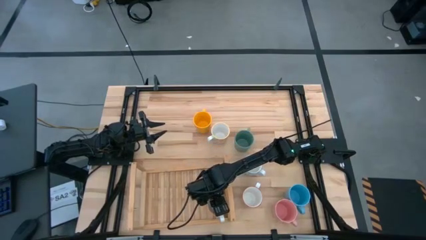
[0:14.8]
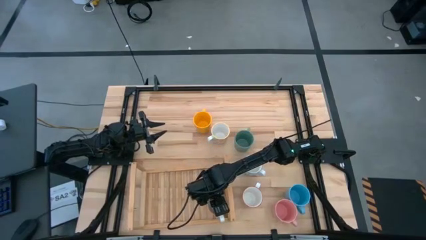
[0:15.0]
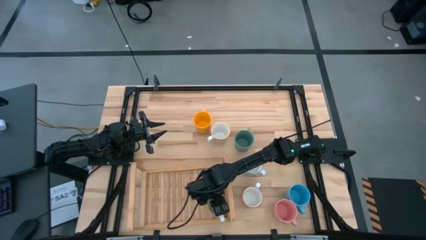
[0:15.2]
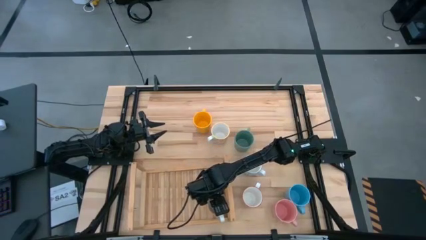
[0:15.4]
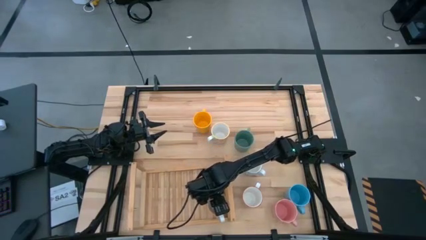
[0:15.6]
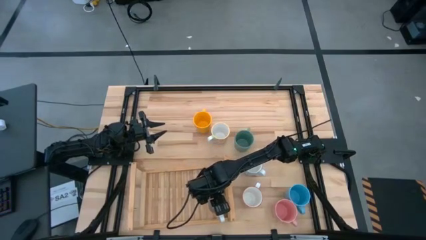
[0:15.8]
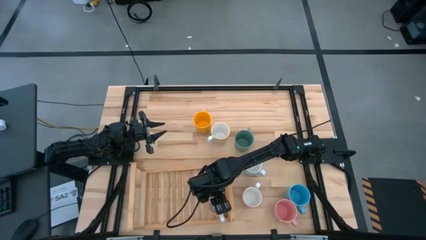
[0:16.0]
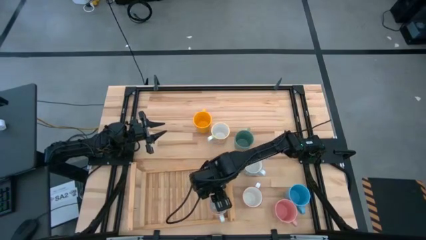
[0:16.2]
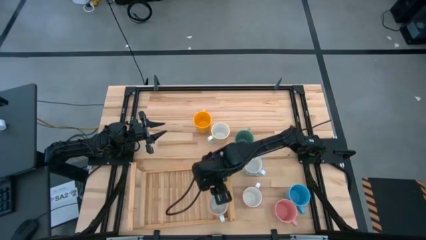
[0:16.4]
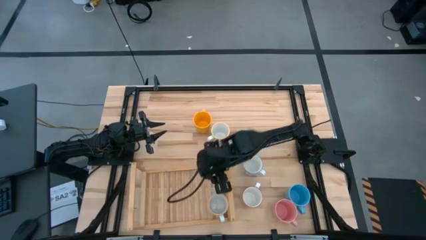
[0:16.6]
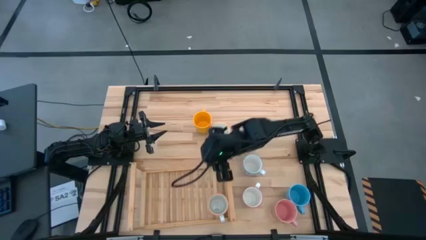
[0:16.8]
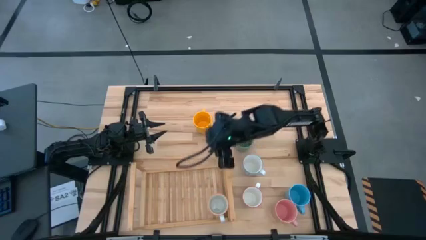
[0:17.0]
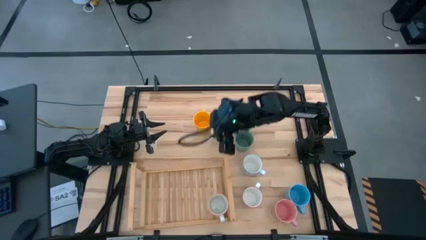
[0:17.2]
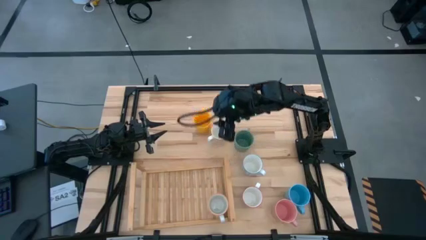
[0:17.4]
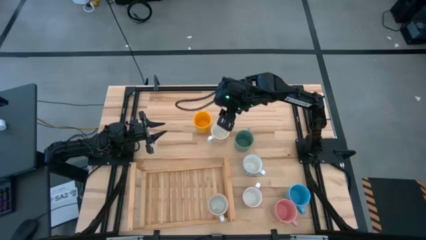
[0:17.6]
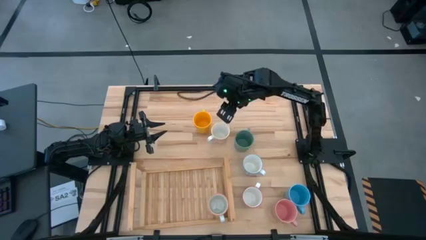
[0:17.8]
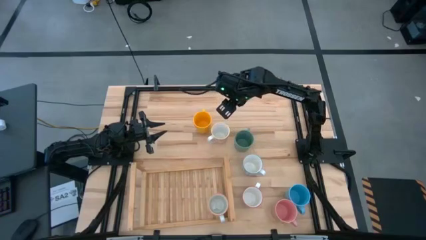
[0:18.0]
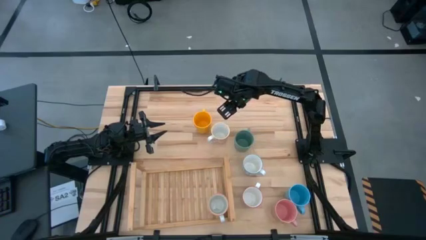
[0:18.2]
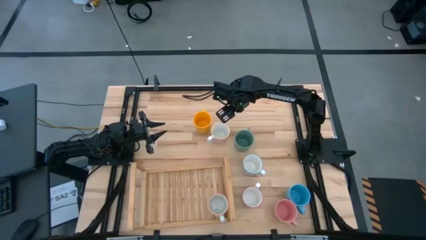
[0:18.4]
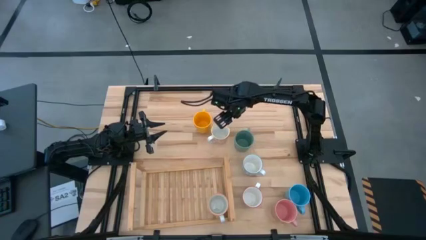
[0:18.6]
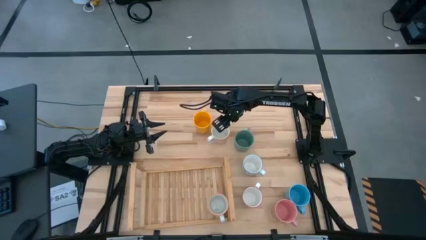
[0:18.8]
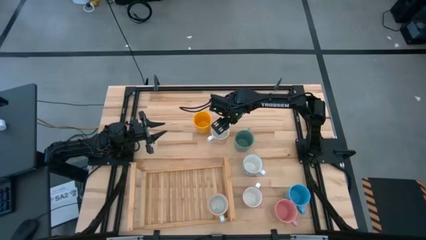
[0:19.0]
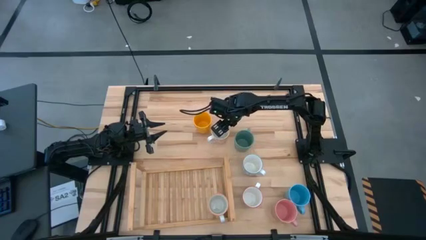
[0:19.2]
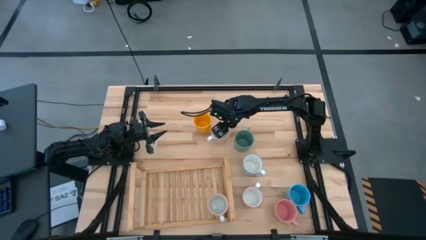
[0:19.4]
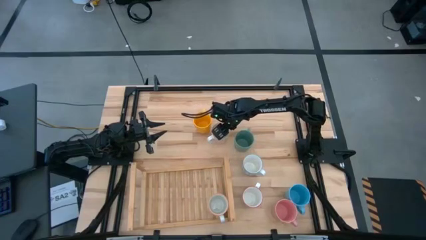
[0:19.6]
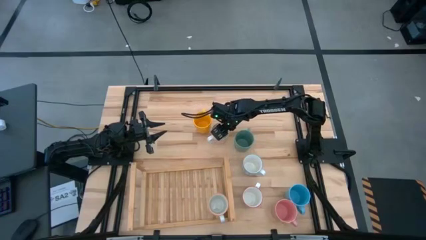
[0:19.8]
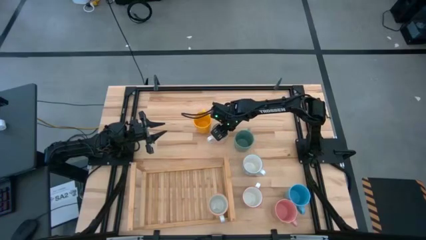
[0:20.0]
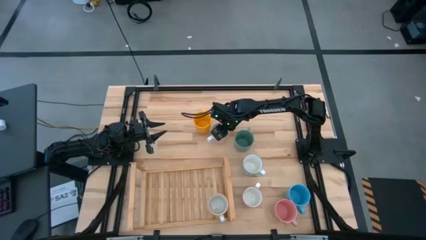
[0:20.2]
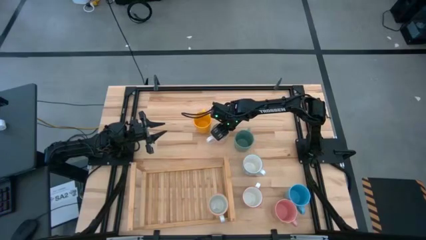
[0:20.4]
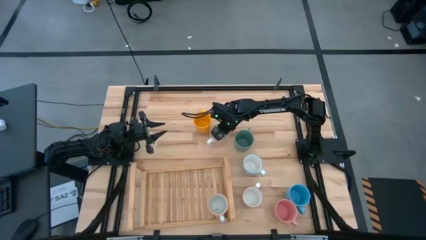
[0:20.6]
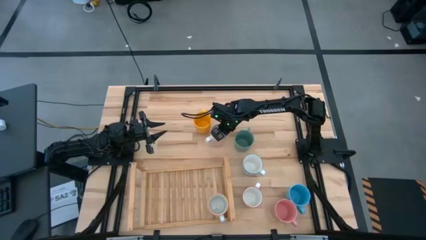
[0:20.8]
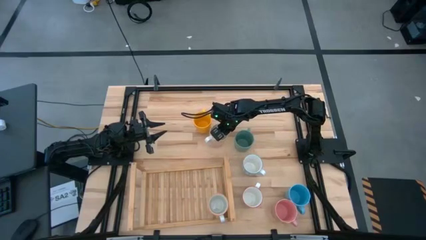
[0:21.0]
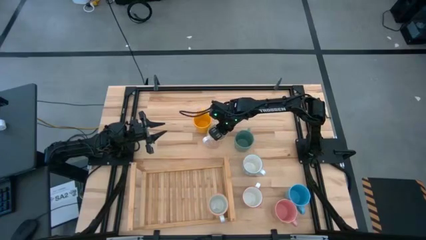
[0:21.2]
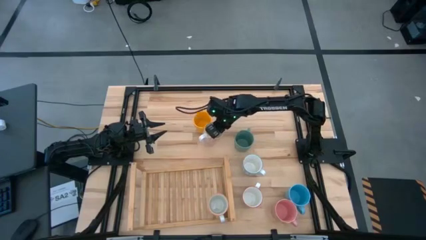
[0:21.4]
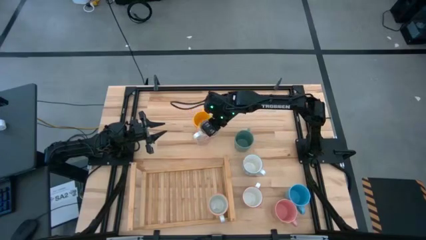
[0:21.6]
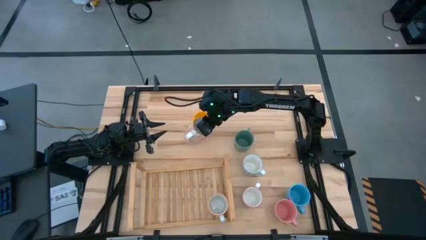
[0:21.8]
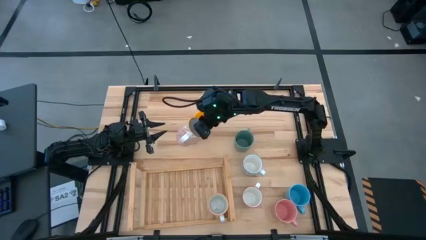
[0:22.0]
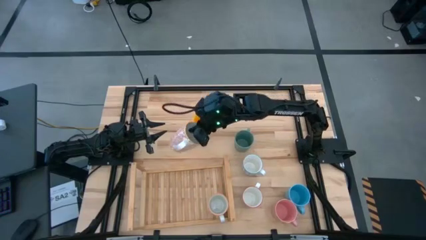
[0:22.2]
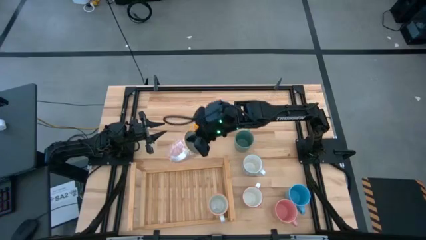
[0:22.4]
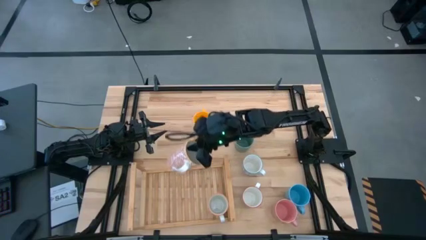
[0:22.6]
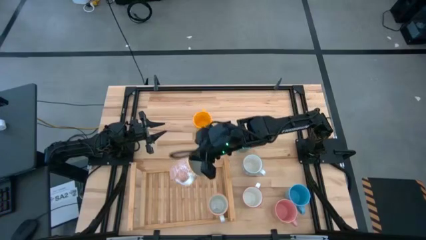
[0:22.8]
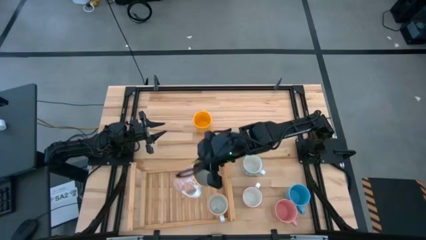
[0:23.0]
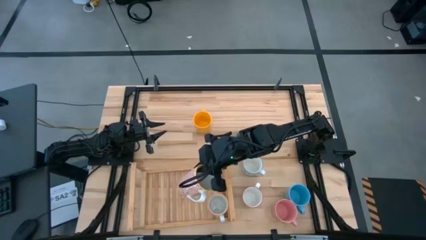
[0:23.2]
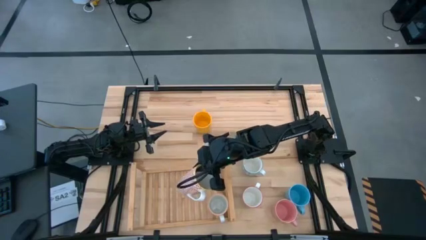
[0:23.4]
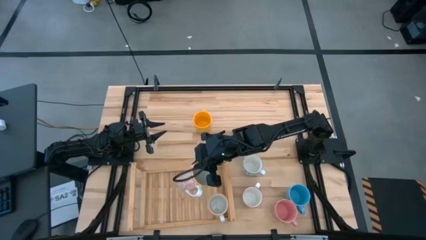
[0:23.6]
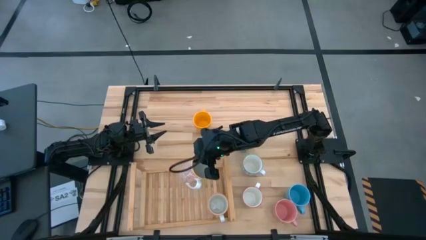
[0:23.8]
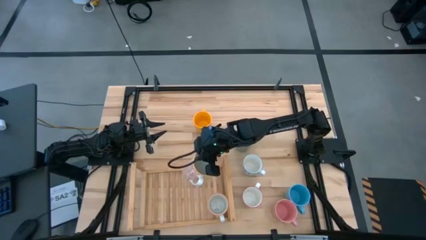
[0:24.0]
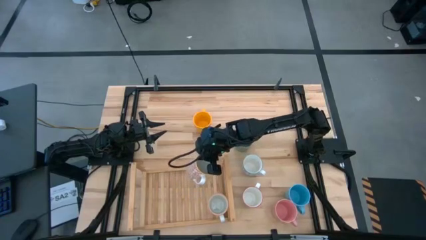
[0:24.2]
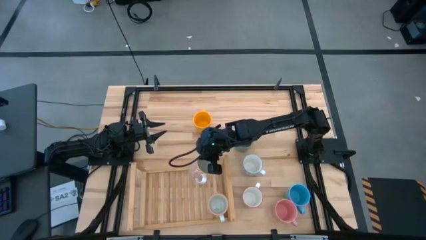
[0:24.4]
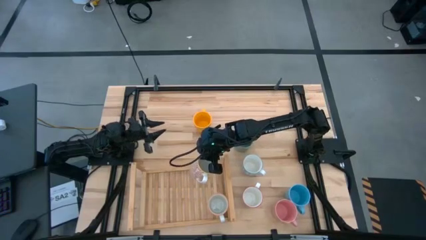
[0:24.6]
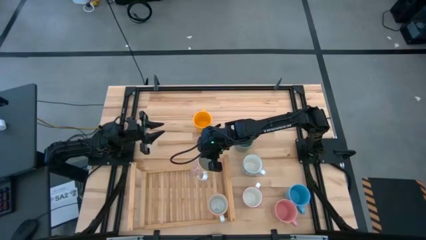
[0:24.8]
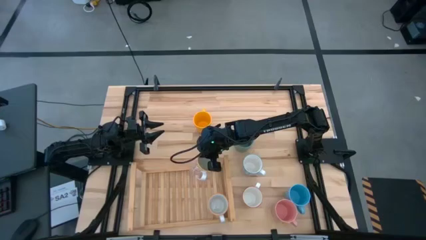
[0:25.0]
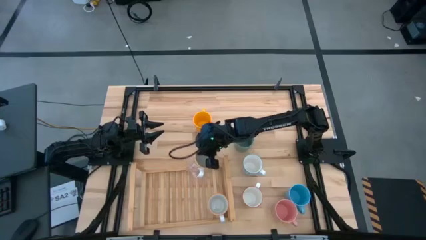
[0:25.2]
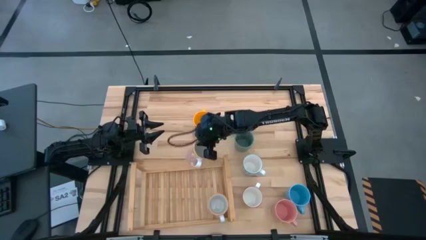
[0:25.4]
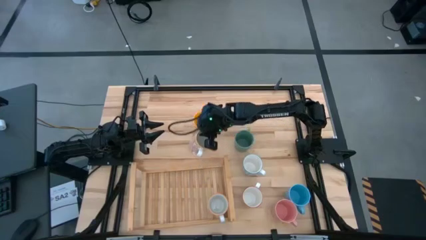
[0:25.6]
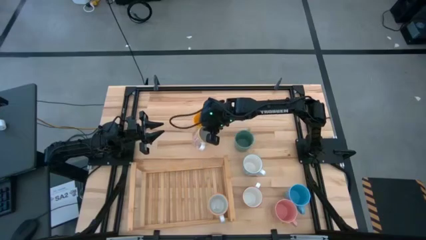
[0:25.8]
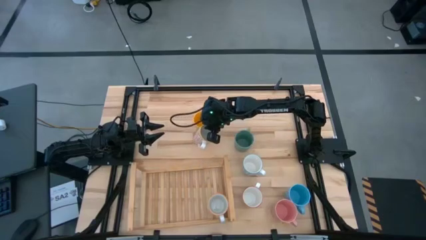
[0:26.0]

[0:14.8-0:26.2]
Task: Place coffee mugs
Put the orange mug on the shelf
